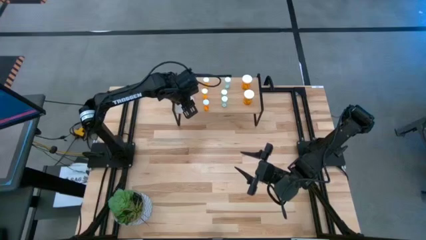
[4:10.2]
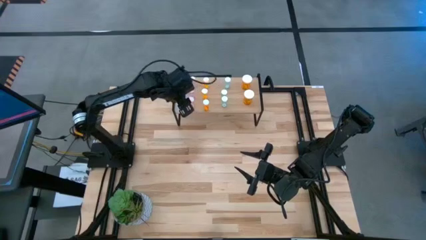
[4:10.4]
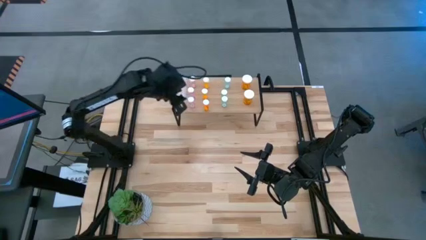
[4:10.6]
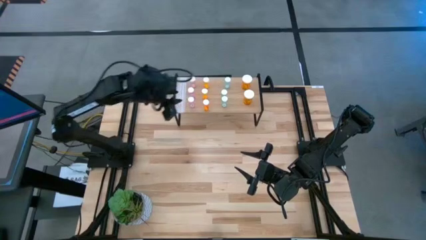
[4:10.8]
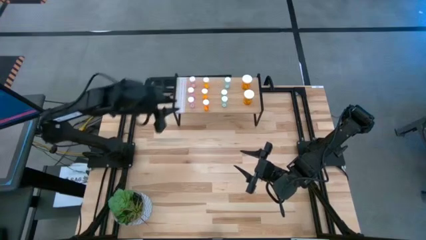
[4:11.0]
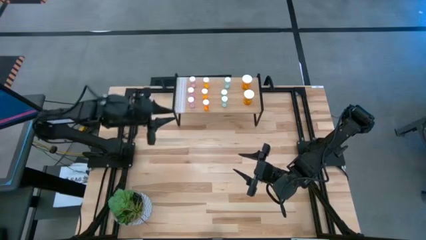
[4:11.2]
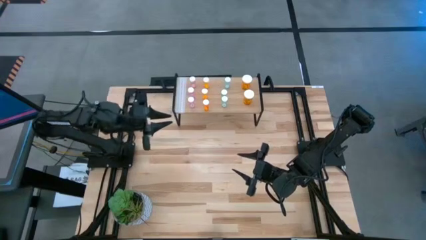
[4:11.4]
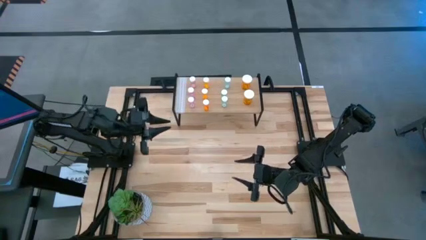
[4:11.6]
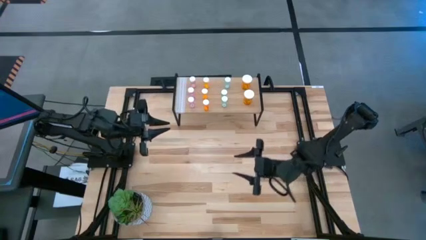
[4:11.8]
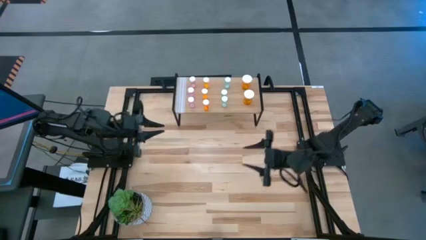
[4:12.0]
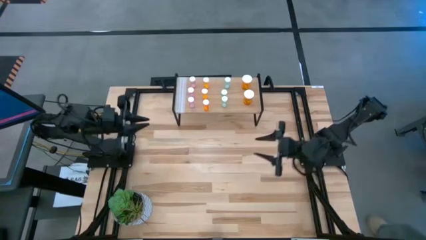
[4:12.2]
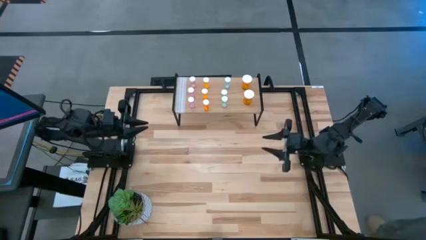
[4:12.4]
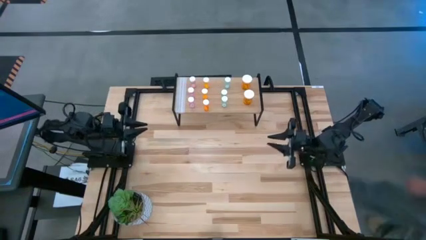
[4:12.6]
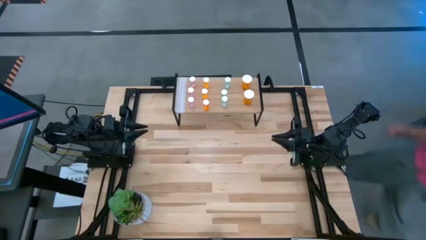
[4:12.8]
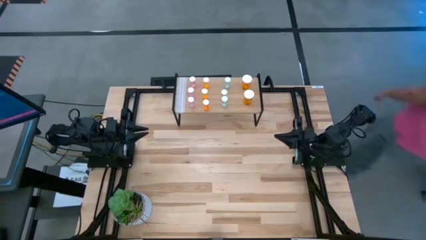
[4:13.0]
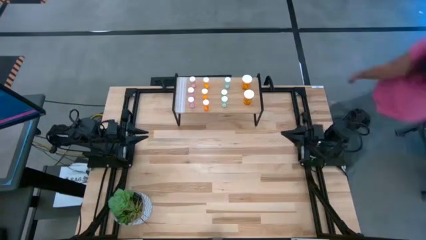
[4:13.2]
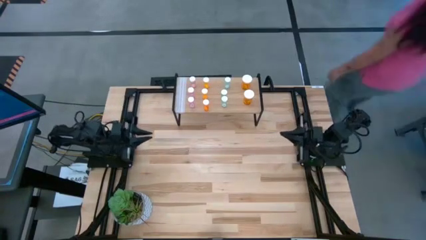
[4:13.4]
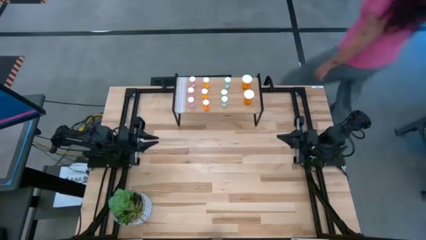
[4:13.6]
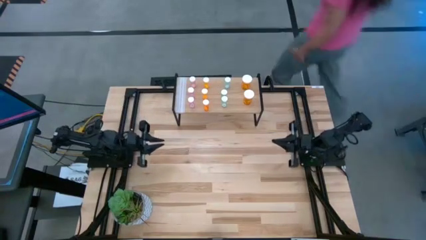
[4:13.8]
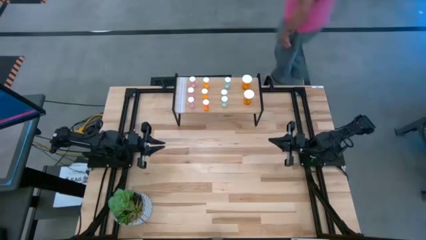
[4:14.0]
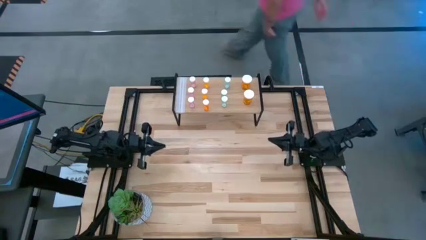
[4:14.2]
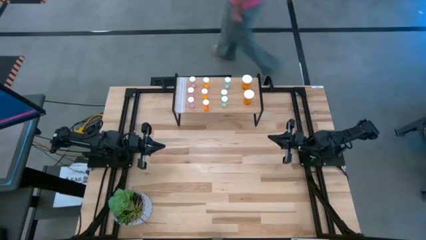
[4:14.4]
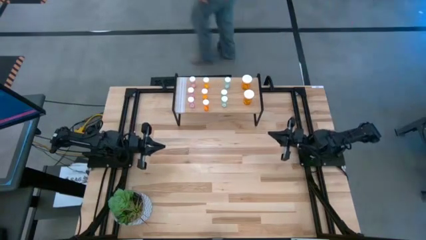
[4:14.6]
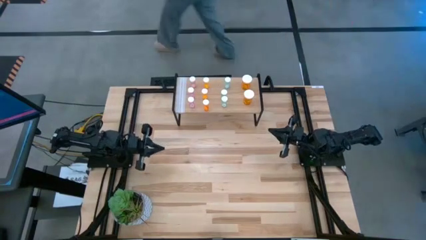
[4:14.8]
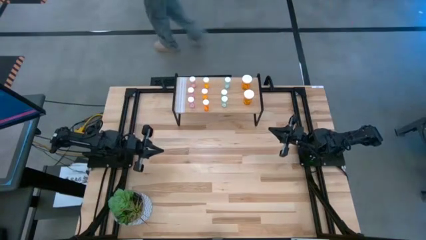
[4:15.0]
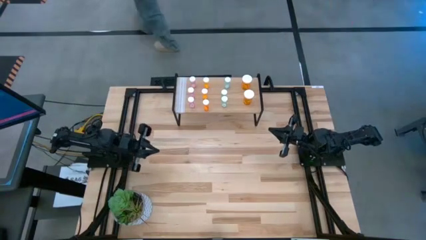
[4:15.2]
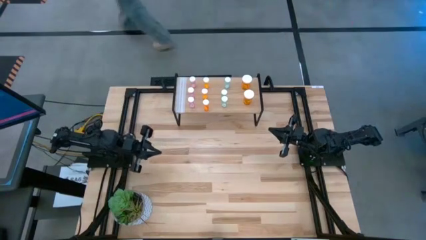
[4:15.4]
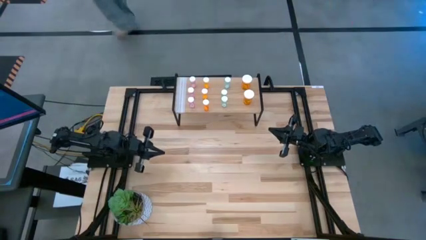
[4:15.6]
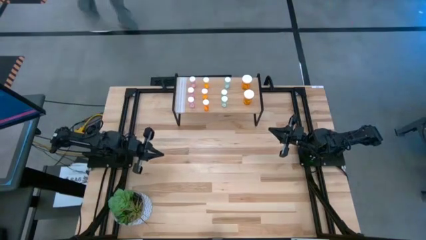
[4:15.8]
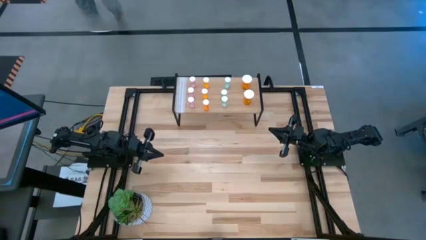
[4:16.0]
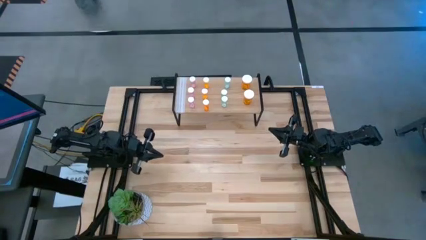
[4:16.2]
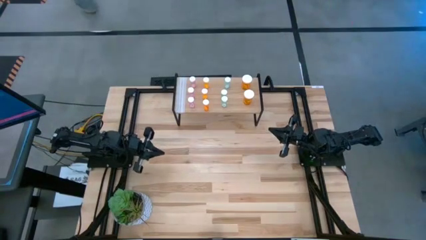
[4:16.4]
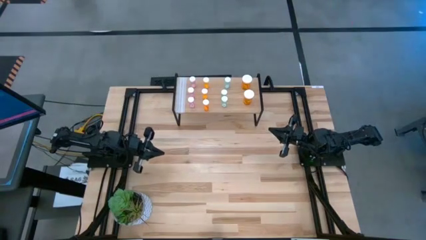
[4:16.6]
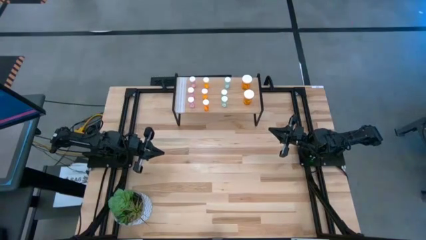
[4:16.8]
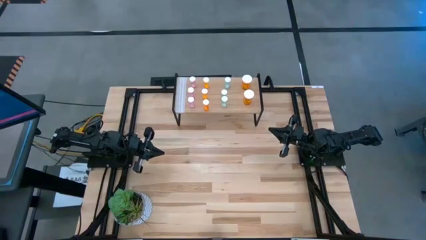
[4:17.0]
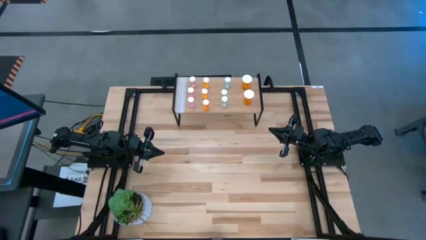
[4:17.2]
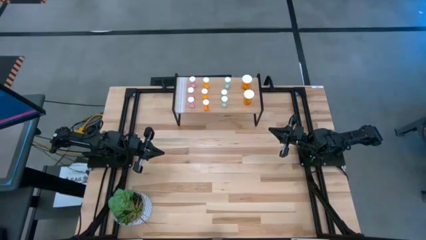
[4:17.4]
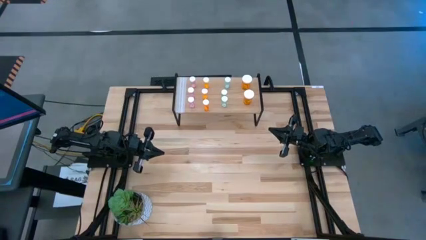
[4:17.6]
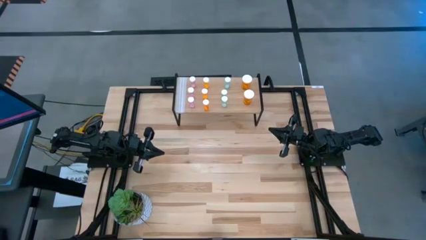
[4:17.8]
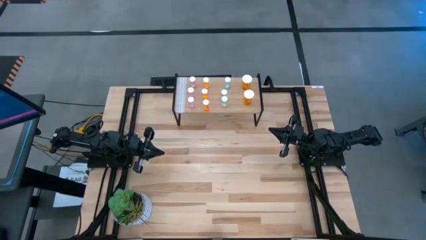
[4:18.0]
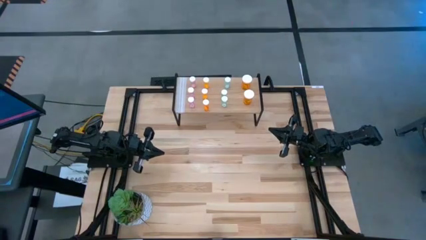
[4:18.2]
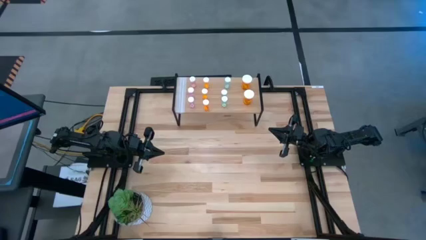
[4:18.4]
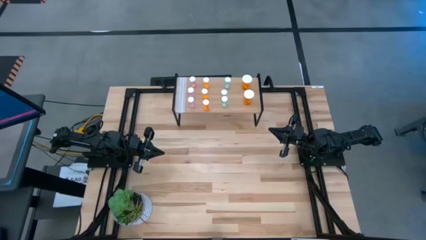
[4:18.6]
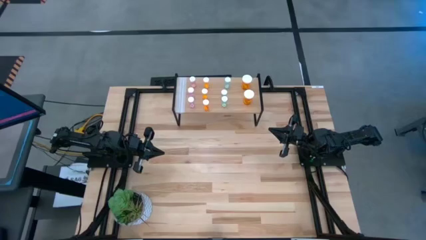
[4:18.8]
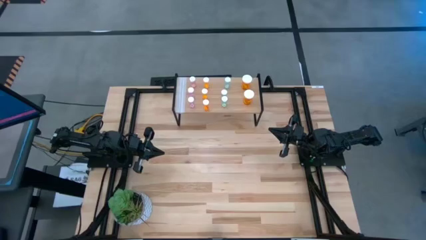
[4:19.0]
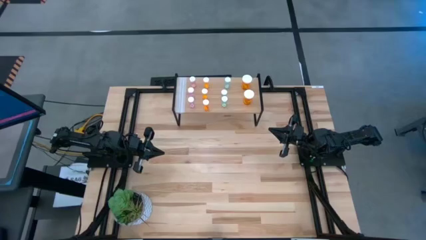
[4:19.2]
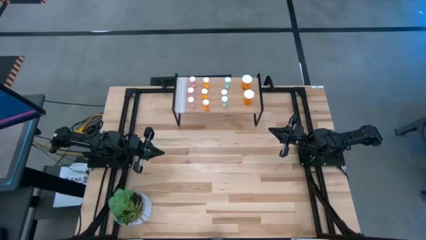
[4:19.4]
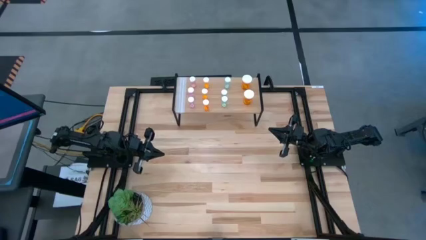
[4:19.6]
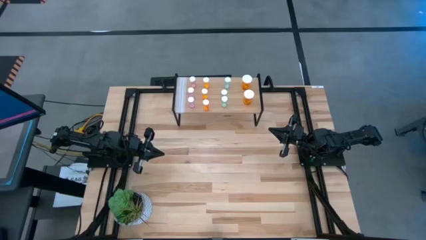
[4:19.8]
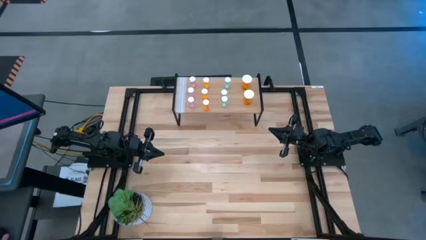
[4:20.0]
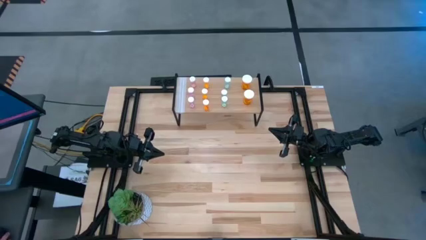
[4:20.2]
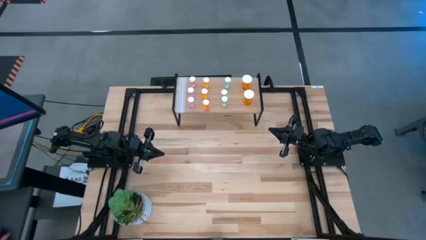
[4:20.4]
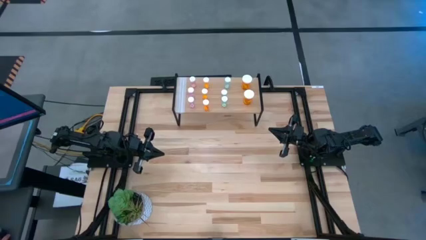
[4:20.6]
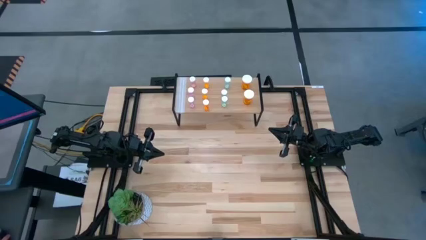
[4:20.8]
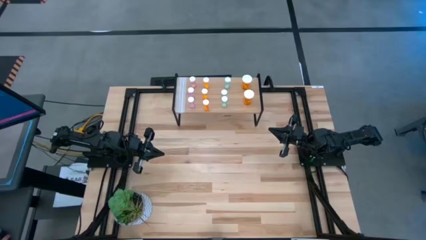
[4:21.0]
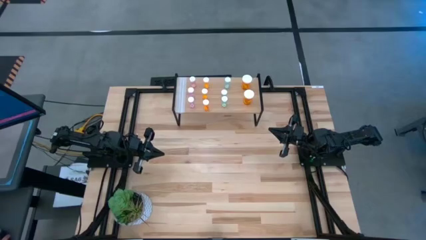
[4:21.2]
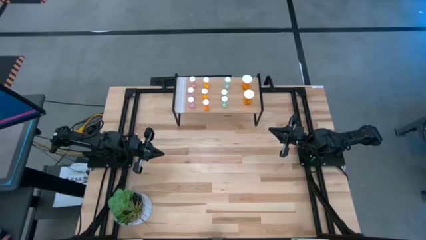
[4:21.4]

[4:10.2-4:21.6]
Task: Pick and place medicine bottles onto shelf by color
Return to Home Position

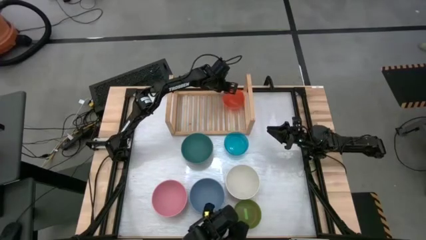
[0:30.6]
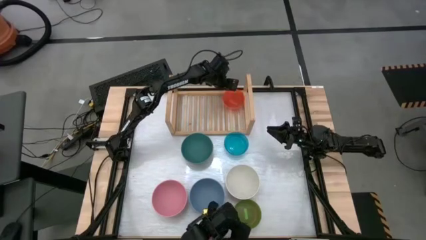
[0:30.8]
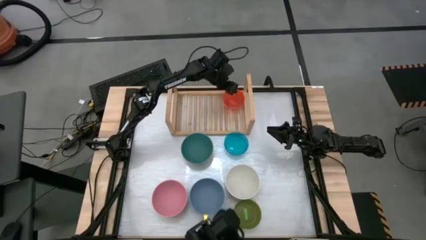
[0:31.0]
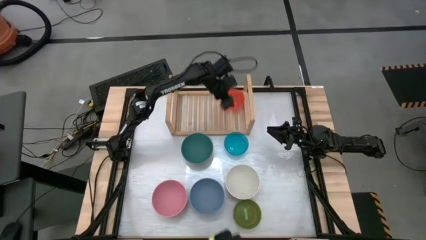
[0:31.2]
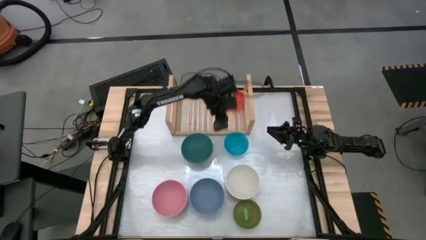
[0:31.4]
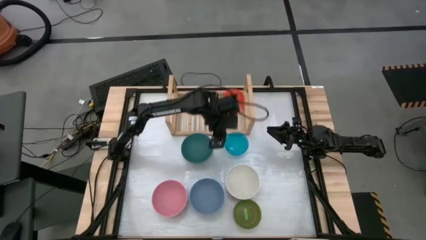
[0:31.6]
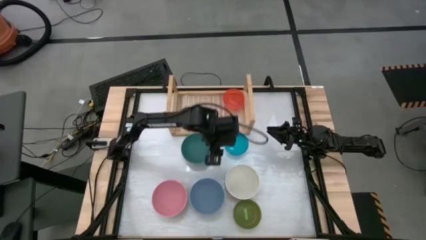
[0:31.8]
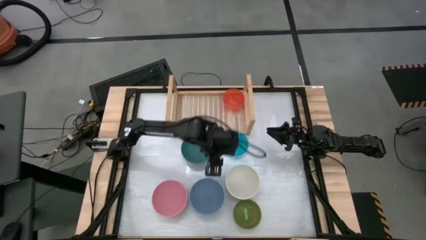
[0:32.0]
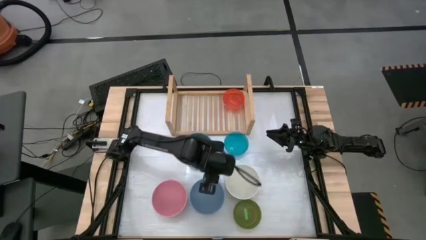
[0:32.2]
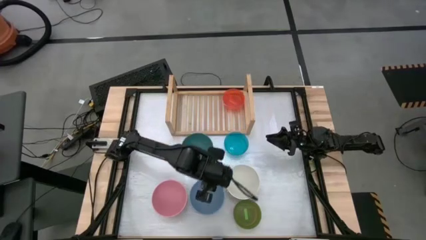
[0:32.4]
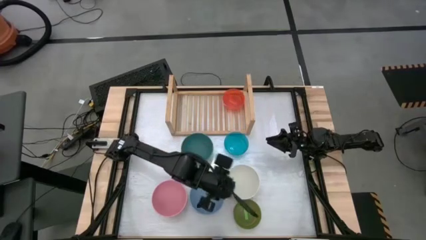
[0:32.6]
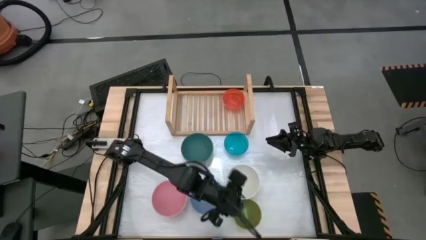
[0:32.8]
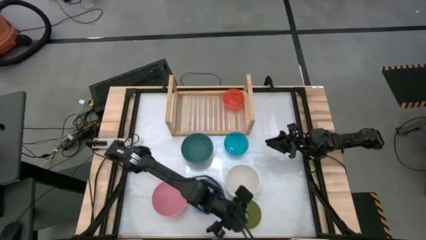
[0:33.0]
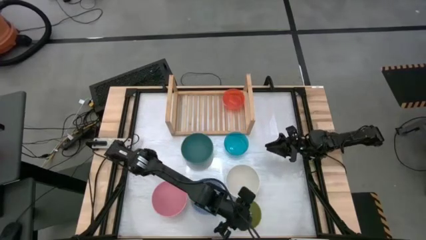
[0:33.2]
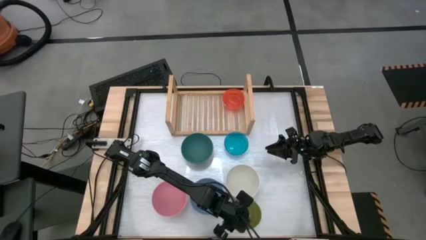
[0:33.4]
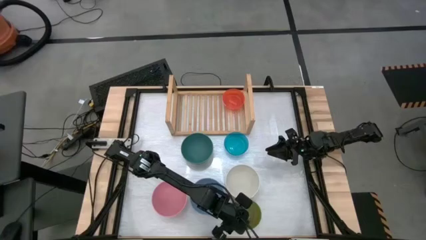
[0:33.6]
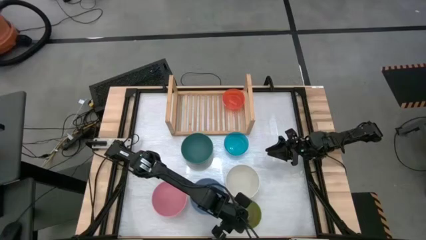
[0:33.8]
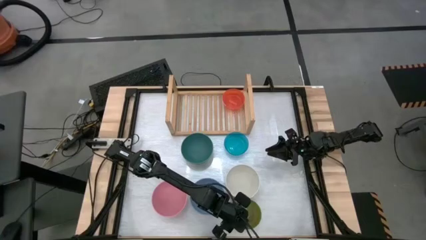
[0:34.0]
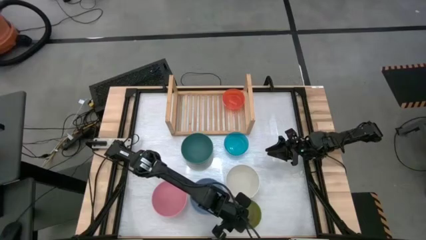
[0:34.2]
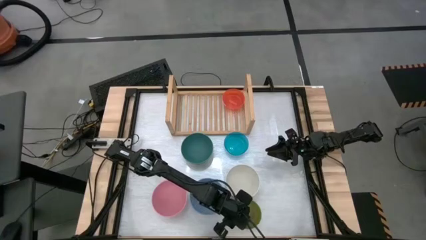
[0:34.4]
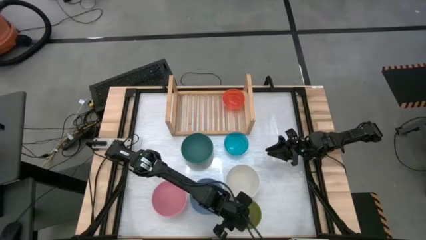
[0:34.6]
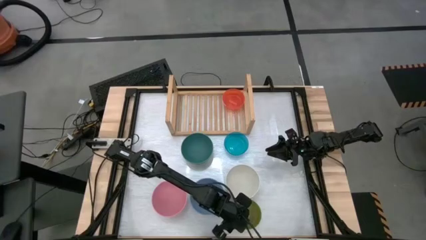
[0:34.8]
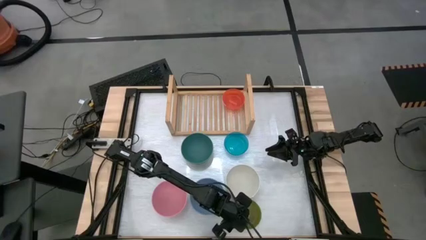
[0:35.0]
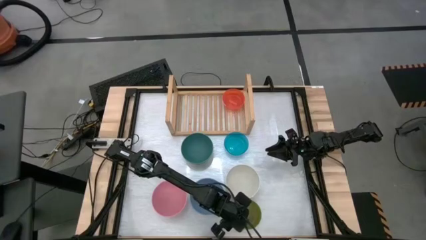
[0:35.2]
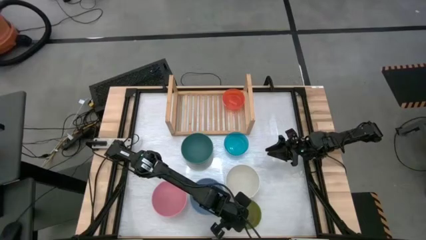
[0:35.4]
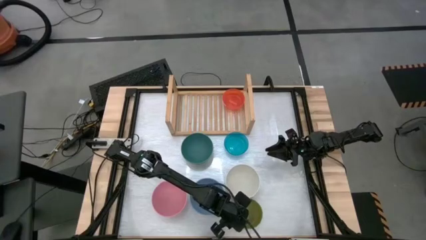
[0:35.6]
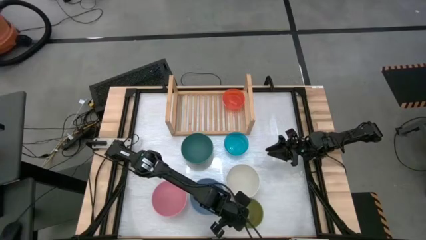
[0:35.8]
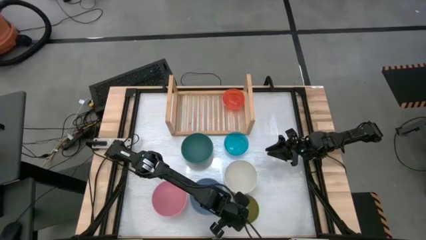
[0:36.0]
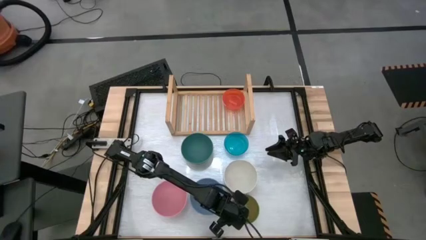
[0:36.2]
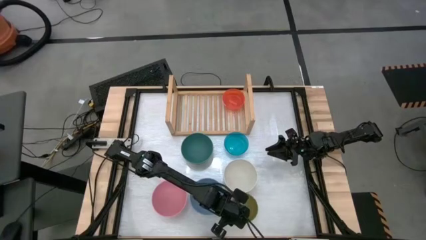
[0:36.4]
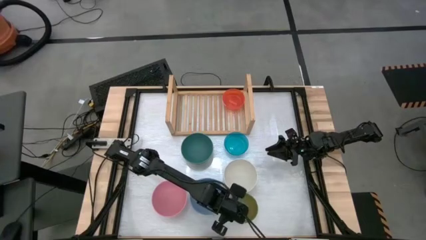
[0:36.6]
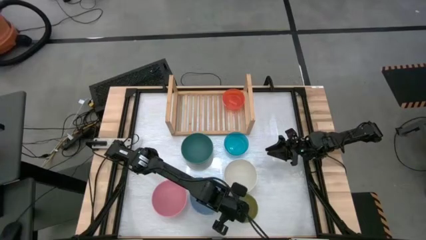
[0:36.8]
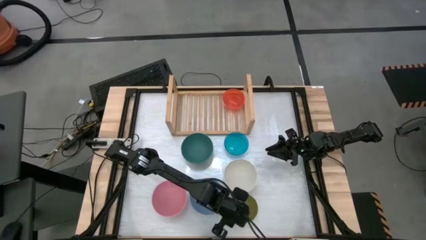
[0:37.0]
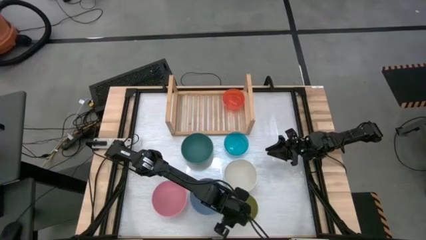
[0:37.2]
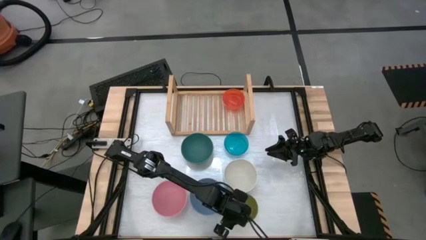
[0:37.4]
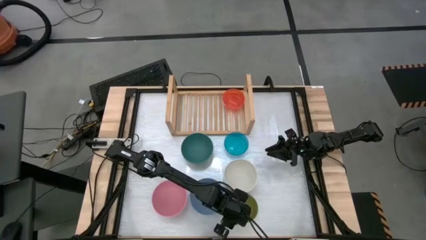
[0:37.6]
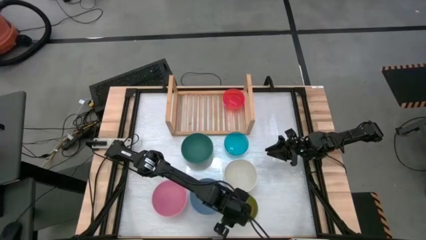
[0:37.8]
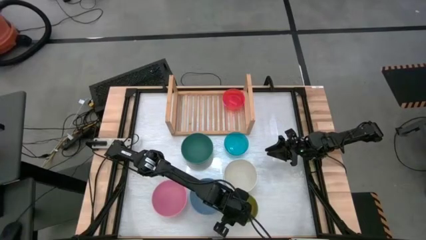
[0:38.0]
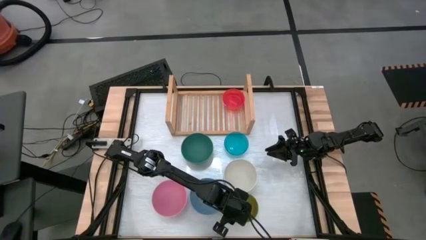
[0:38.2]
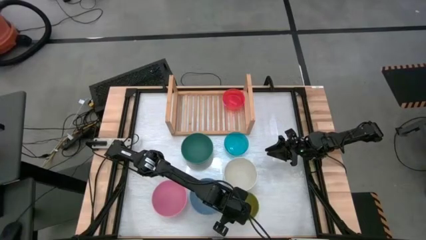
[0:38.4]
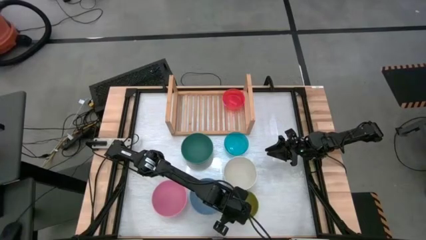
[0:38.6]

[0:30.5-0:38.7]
Task: Place and stack bowls onto a shelf
Stack the small light green bowl on top of the small orange bowl on the shelf
